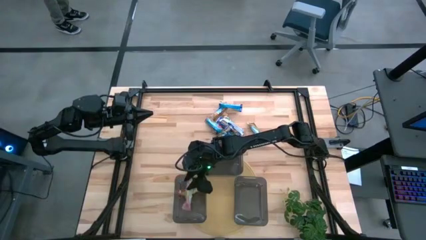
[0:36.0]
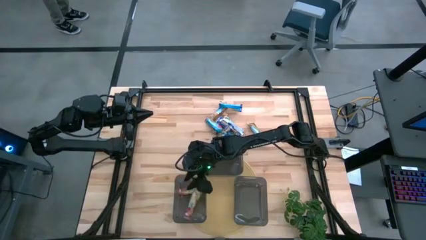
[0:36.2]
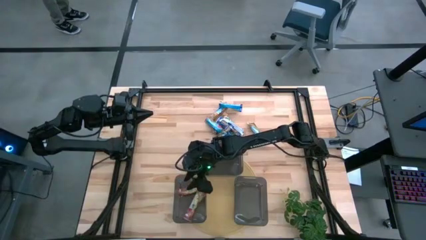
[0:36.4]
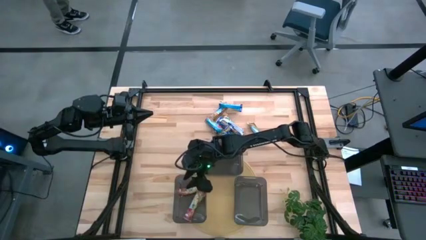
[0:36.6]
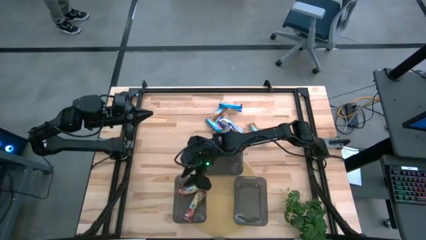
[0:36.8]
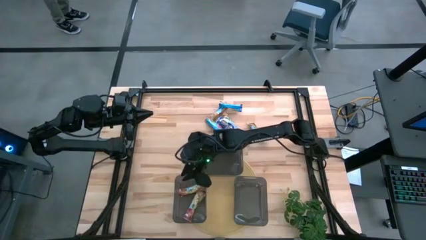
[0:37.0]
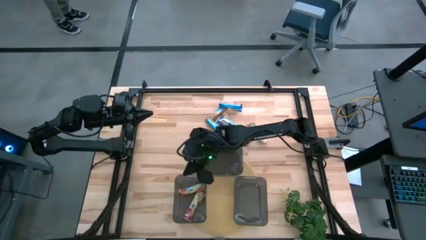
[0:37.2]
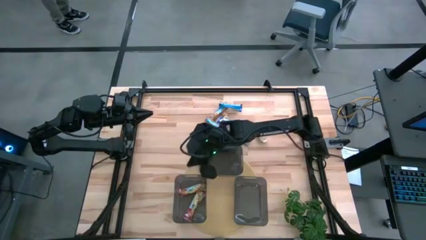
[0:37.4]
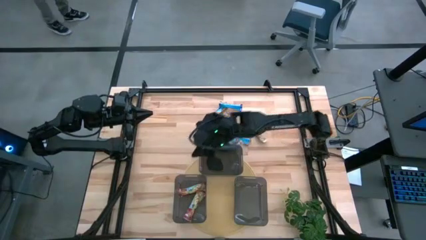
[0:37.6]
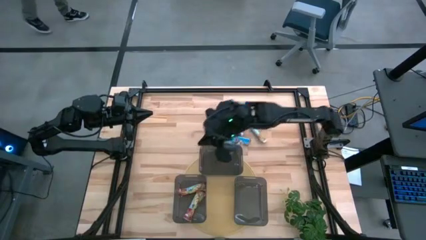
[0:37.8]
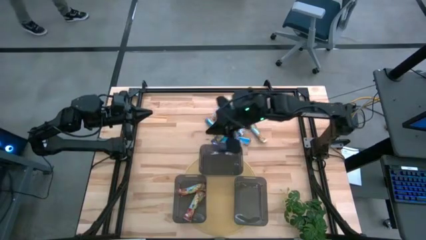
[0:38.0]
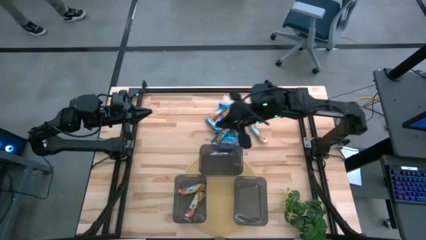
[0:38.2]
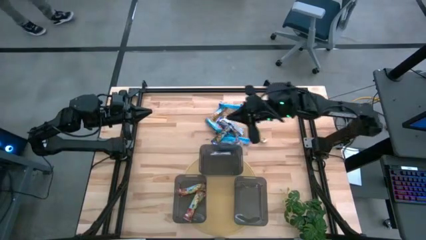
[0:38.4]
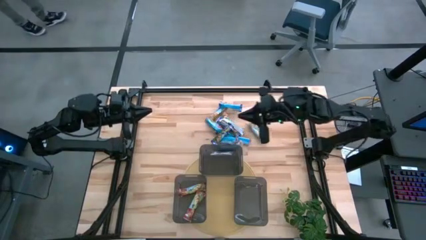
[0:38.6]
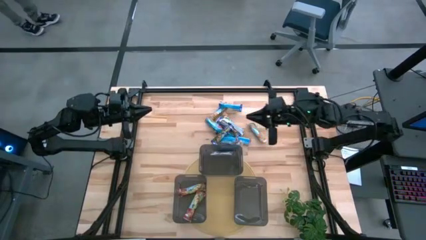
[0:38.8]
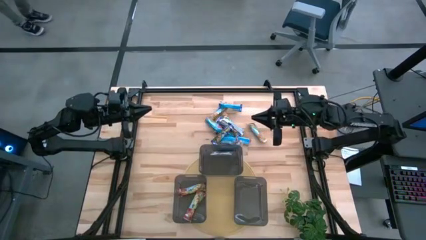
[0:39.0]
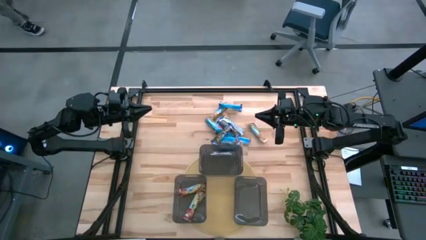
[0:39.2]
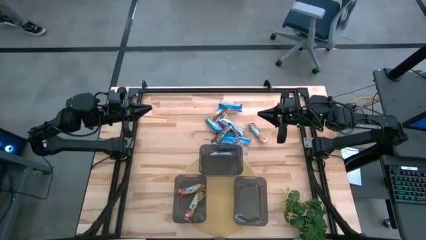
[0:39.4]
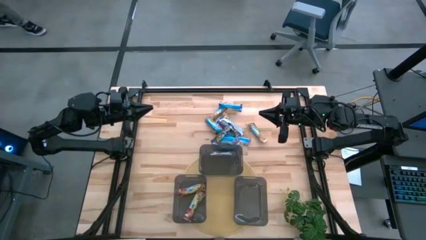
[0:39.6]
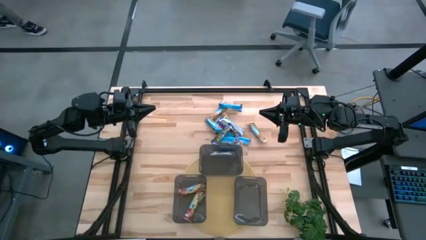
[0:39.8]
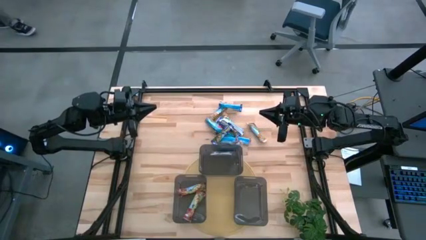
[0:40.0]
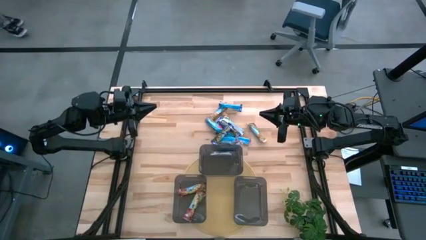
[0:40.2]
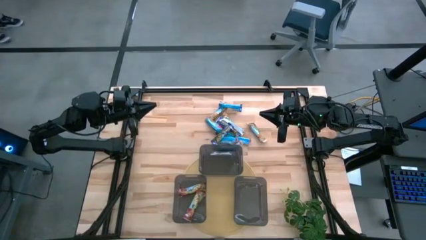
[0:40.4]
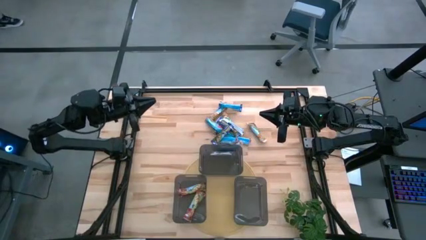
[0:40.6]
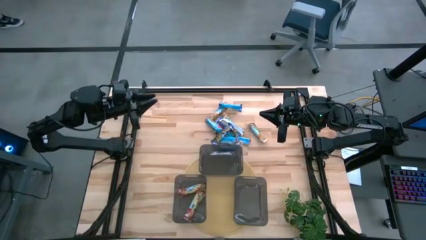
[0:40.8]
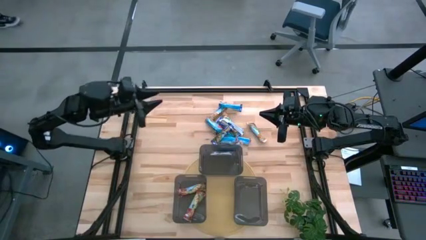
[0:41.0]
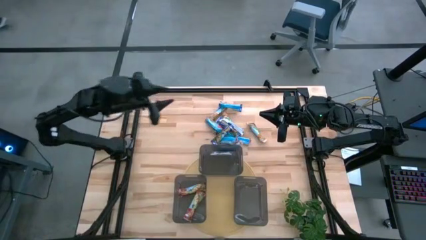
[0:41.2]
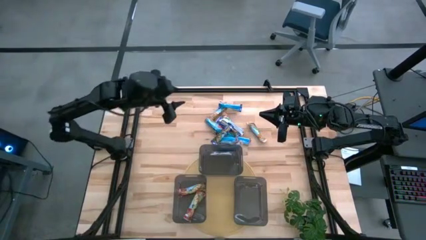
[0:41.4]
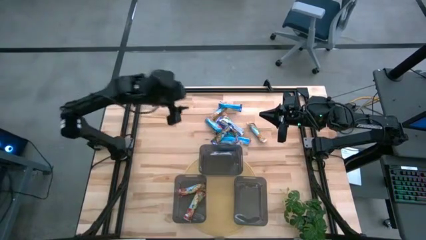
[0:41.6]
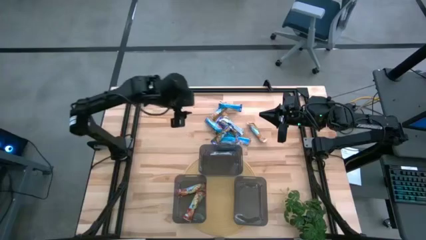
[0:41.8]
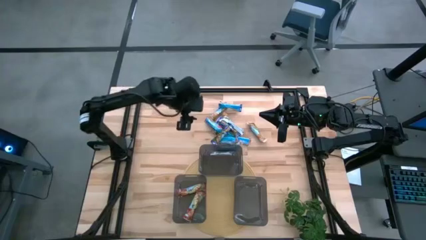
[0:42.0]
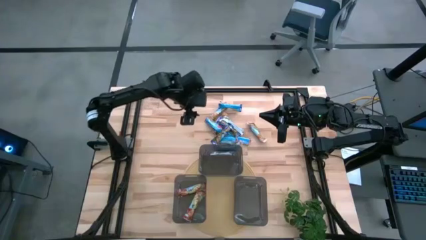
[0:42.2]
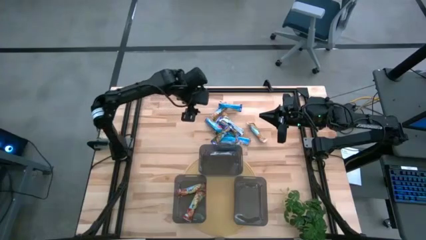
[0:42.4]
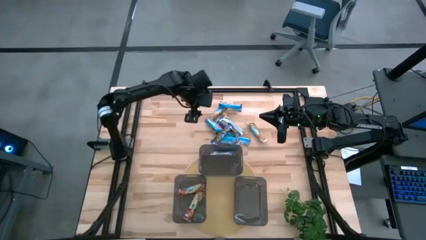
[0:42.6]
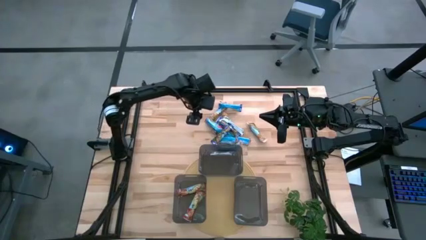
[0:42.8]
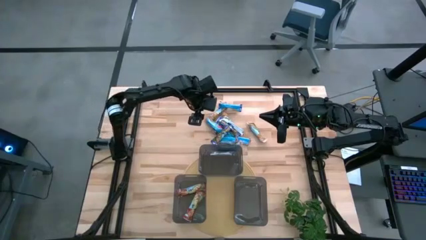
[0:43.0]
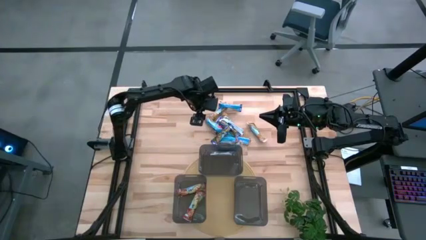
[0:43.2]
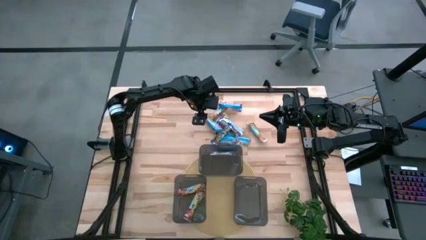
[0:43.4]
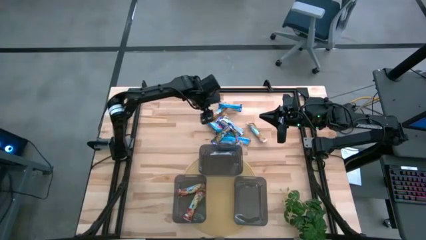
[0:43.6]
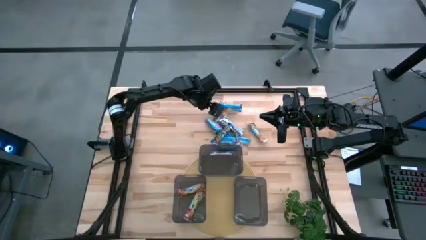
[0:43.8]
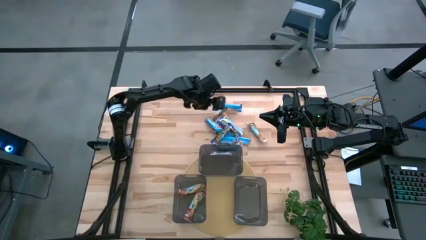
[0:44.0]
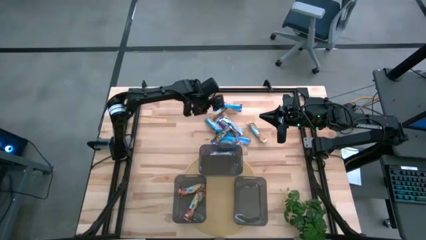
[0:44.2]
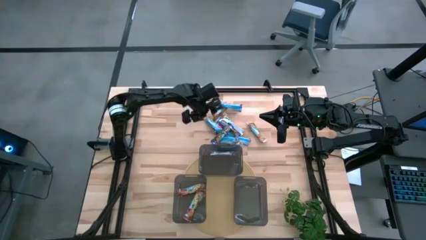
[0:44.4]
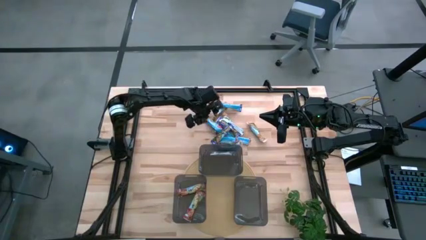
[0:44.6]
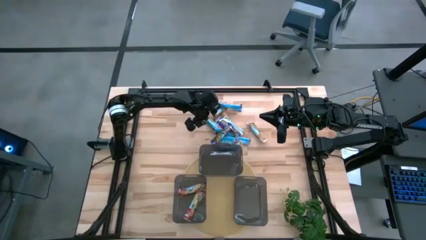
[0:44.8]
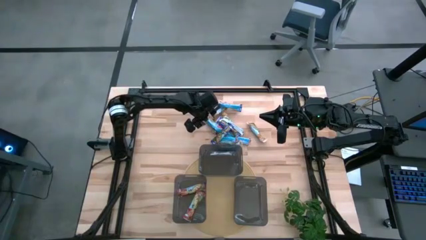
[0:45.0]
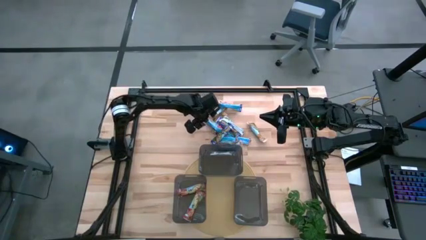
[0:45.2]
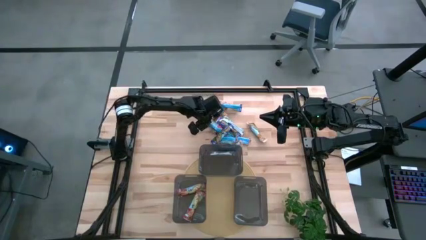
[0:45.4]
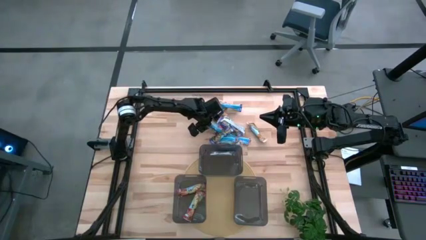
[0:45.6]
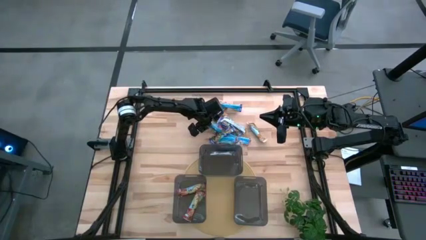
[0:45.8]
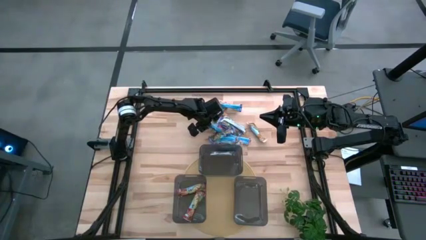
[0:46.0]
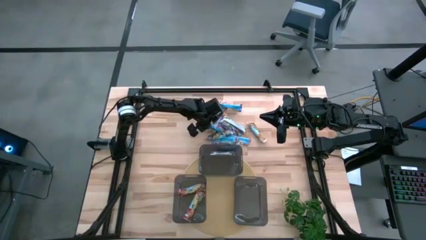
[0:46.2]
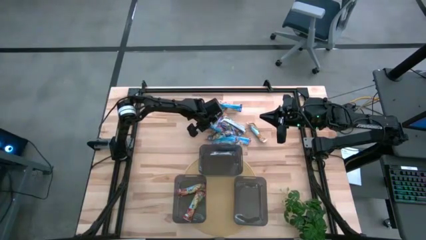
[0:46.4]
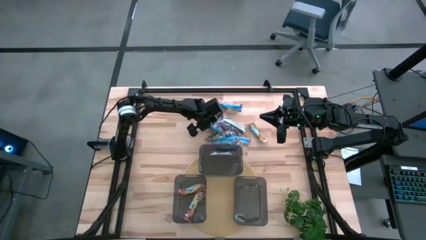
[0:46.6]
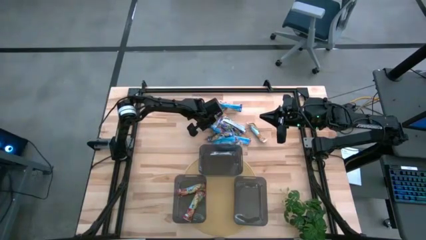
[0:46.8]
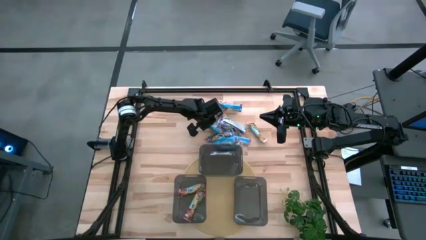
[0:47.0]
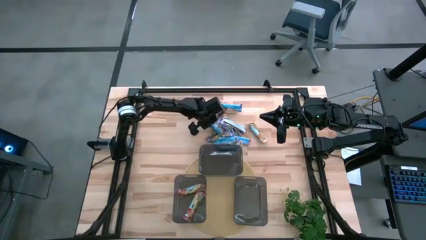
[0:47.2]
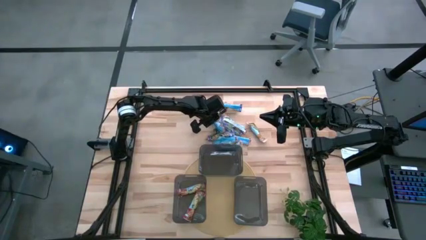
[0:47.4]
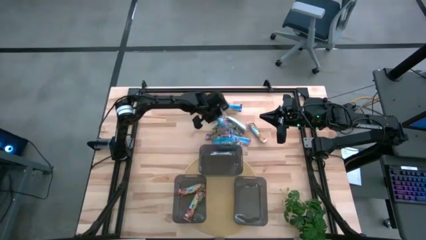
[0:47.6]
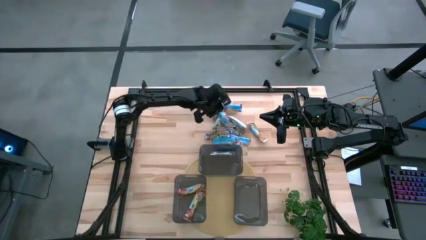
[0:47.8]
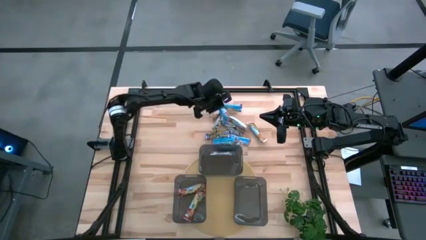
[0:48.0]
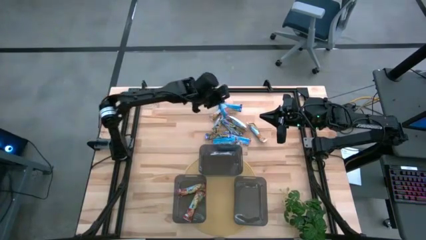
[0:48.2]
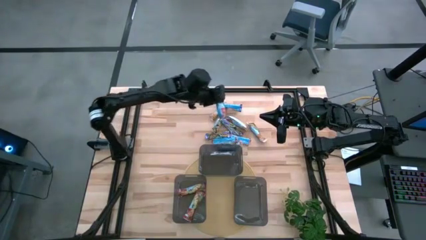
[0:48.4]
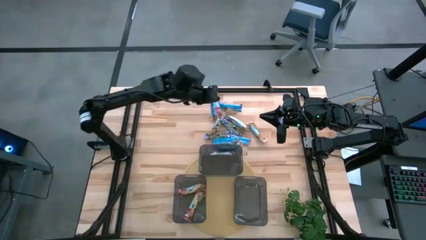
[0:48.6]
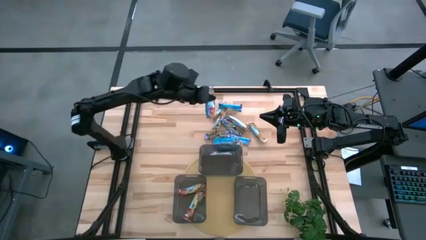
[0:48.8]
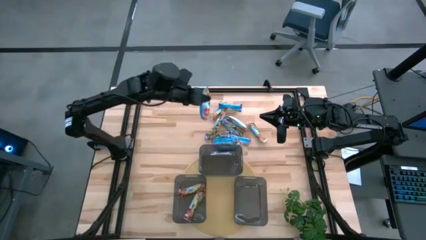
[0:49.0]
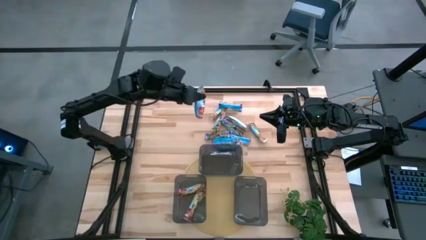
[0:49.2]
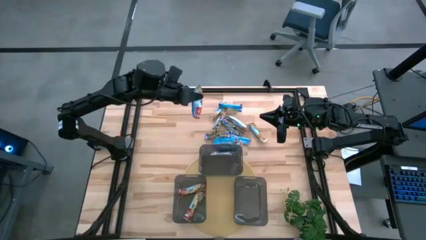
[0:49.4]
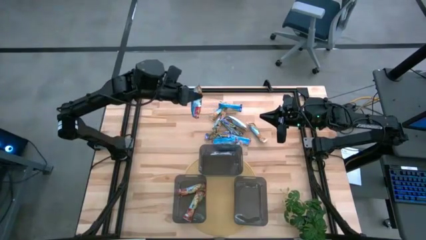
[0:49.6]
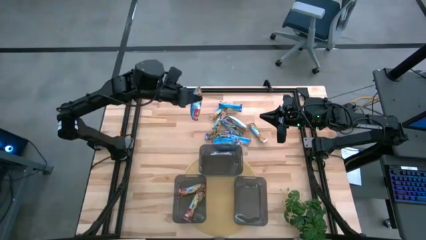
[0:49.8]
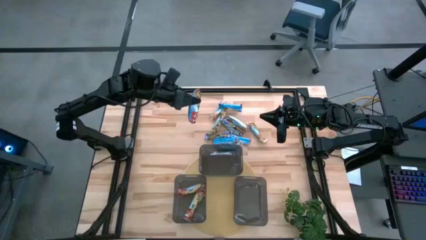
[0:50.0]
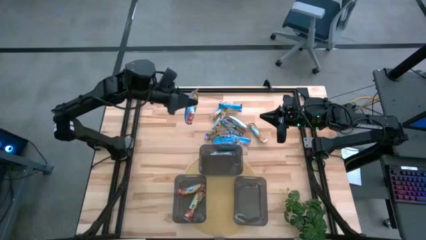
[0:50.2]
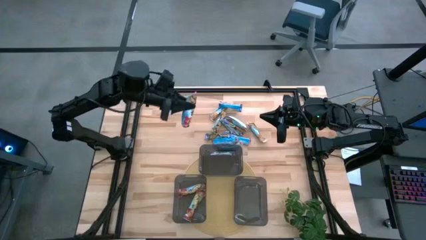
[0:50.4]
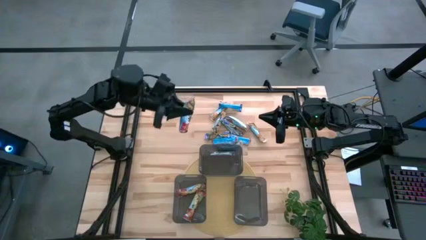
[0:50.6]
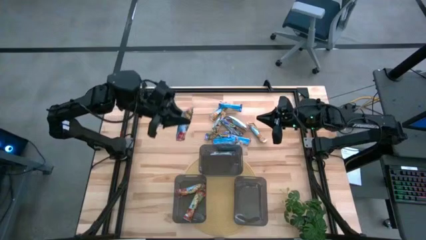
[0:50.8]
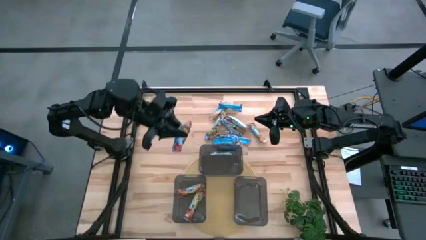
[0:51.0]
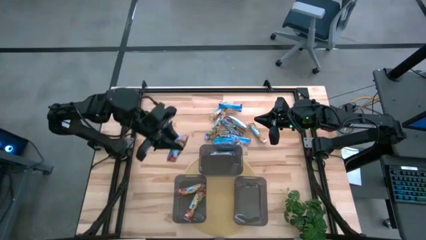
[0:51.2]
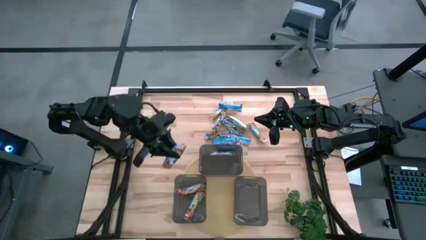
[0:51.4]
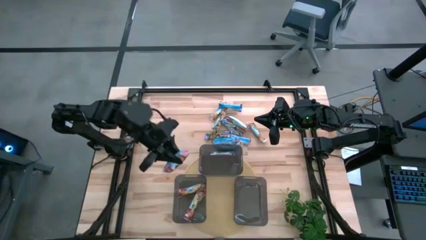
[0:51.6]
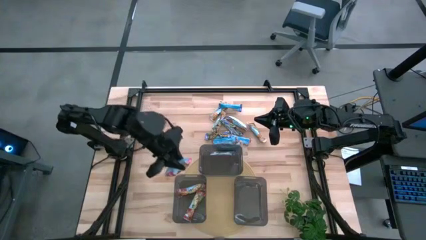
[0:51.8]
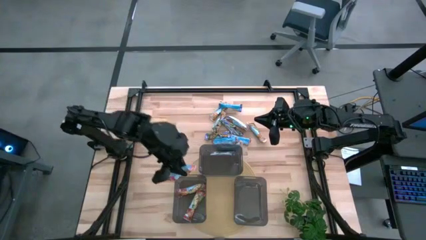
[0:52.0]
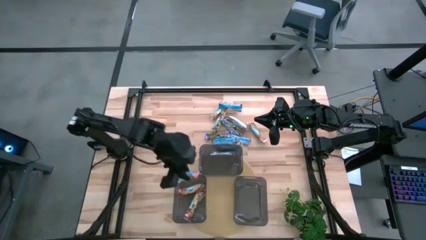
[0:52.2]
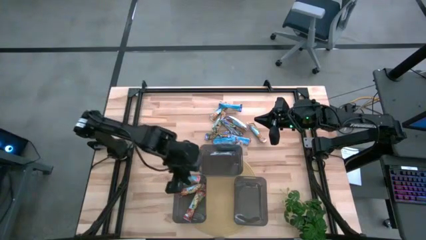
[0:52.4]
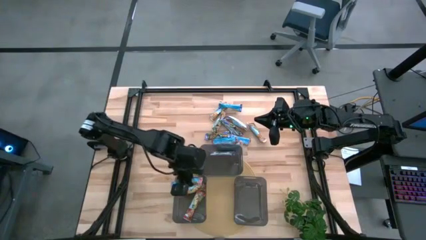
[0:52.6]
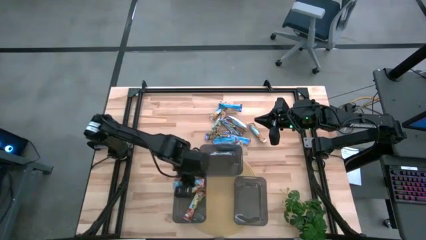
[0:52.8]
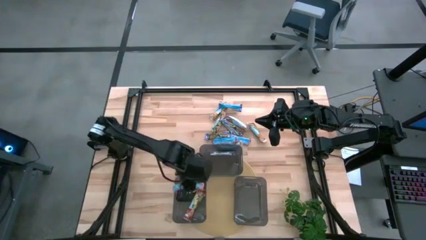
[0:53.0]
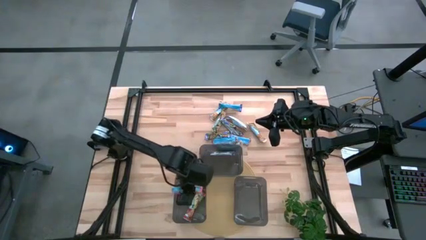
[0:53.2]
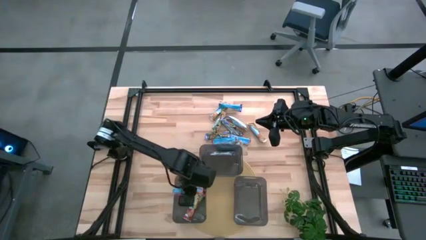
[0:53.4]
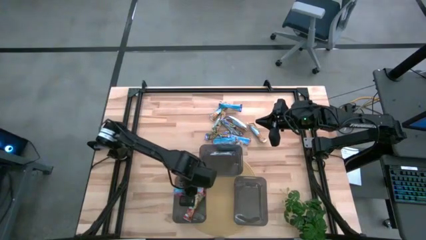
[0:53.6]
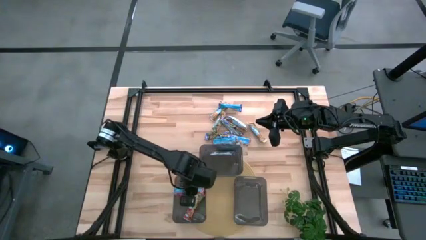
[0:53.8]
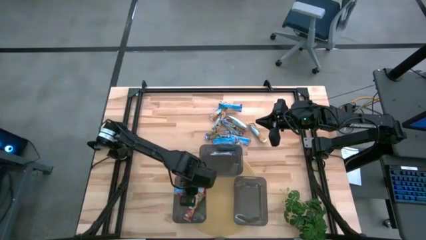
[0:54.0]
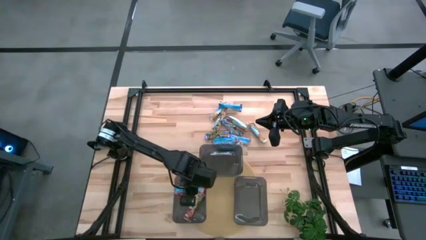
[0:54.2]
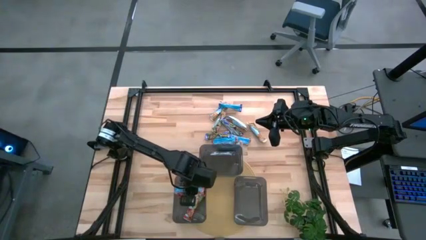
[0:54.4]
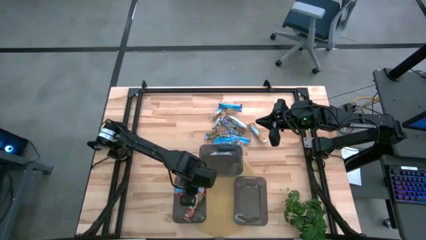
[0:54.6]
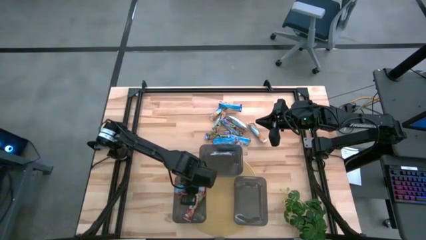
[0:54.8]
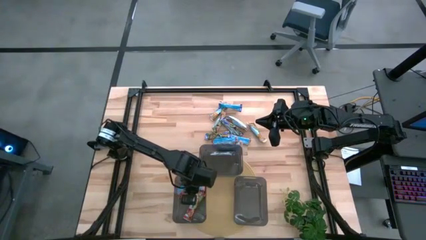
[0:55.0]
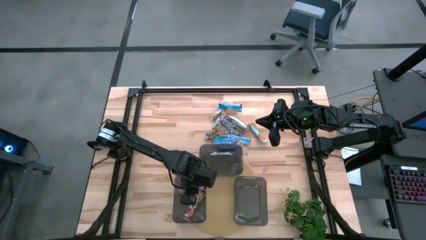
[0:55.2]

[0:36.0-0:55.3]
Task: Pick and place Granola Bars by type
Put the top left red granola bar into the bottom left black bin
